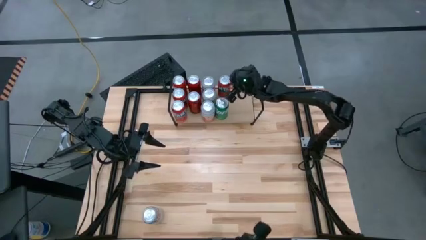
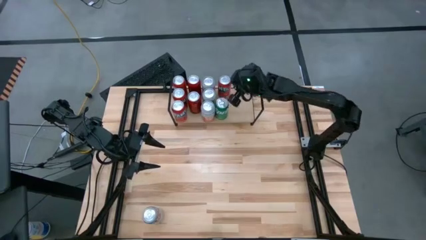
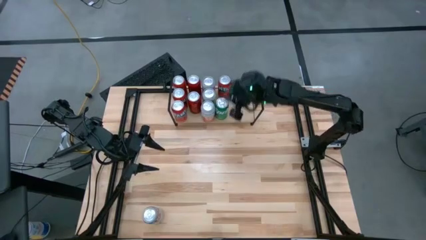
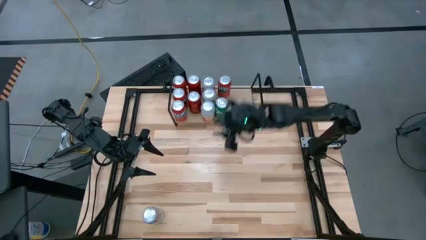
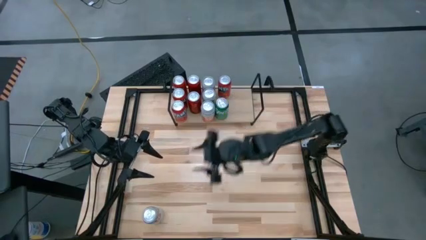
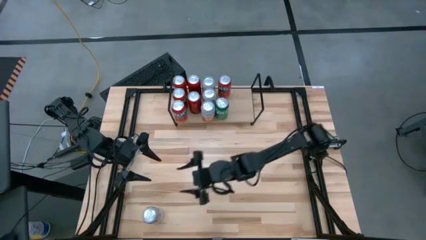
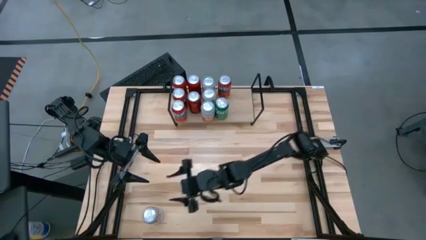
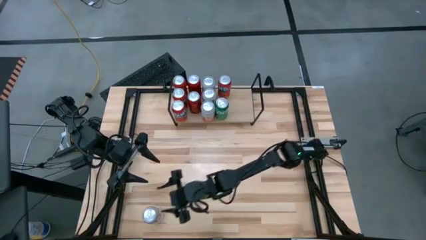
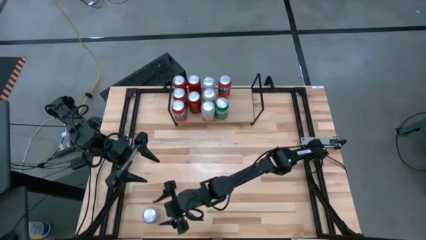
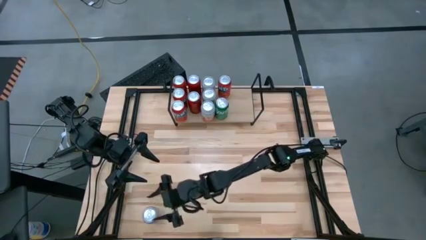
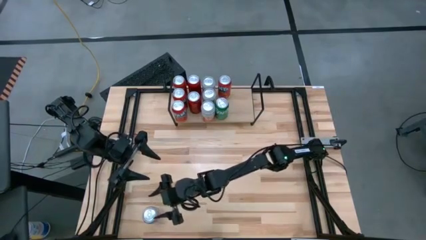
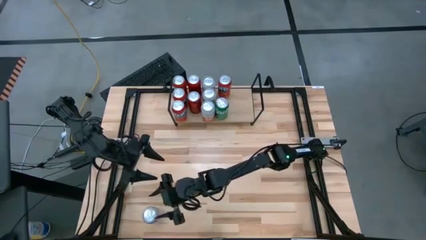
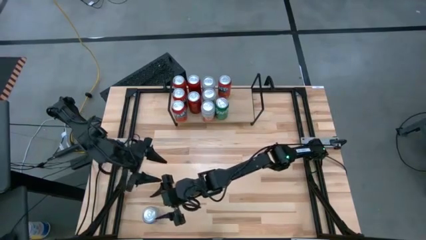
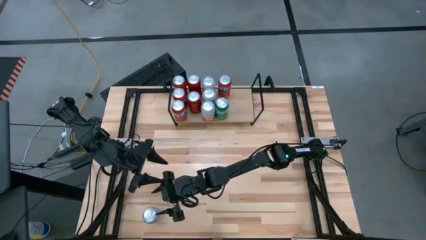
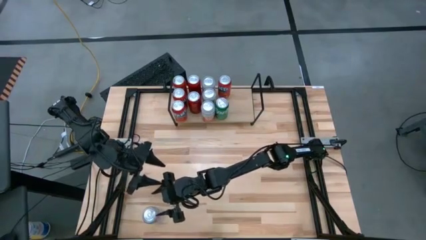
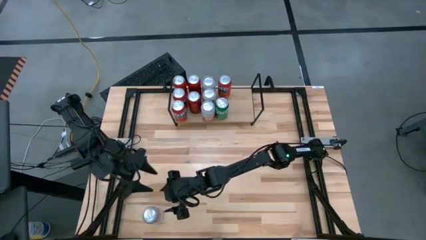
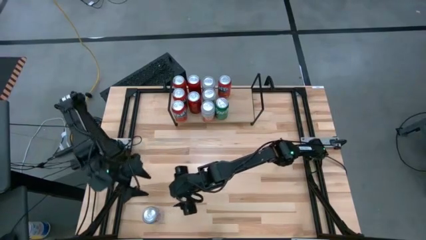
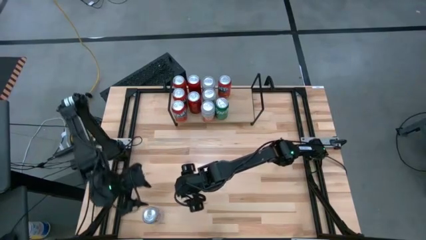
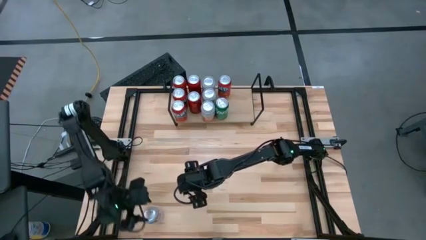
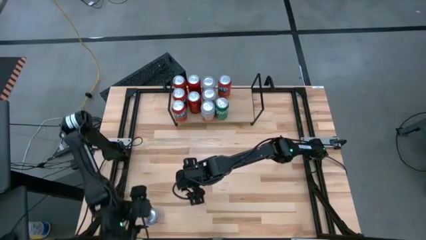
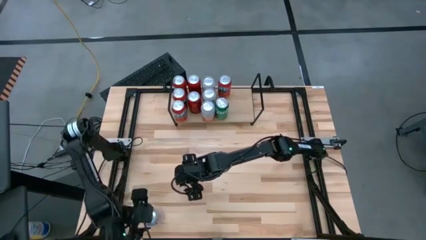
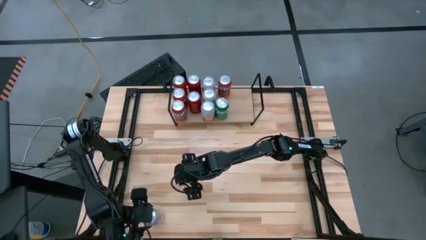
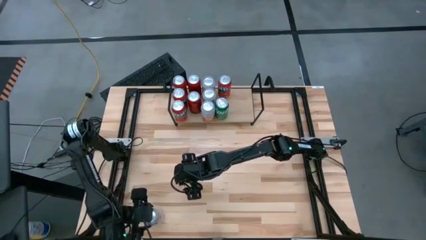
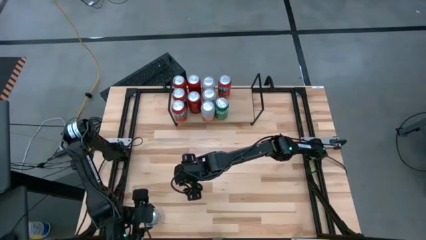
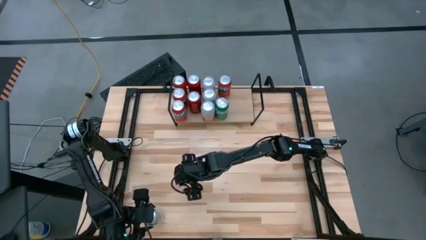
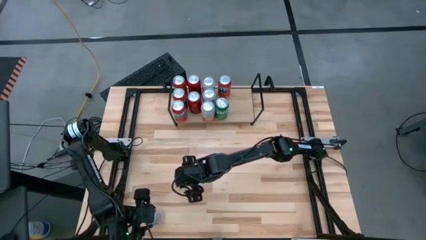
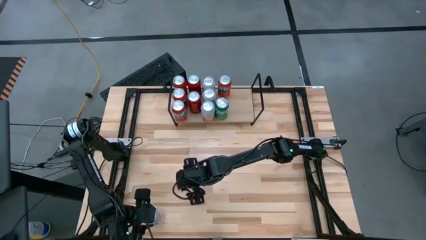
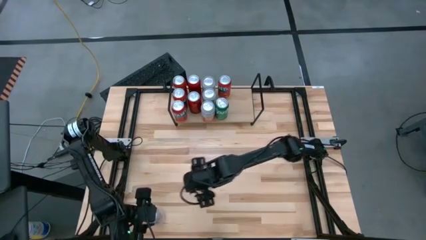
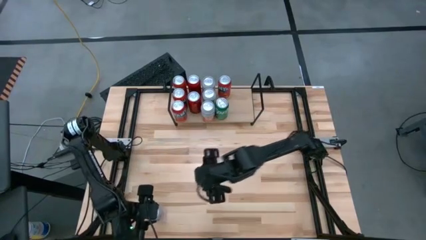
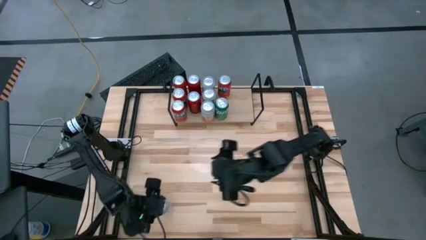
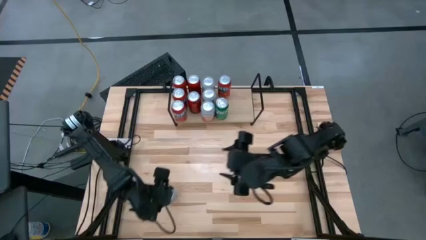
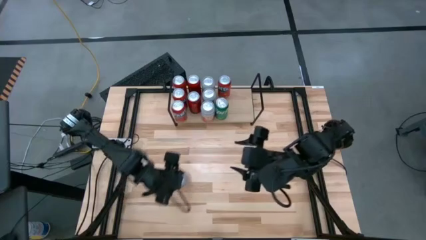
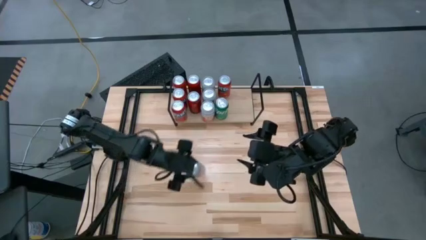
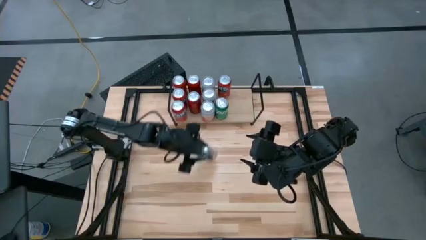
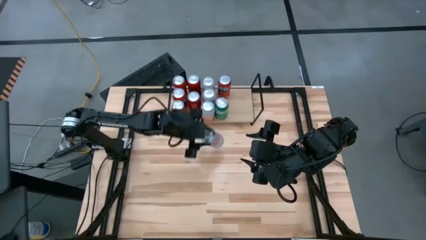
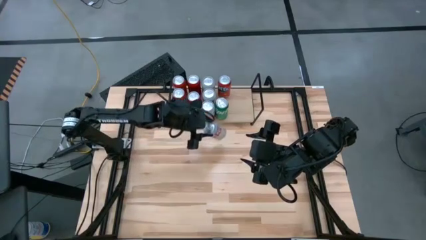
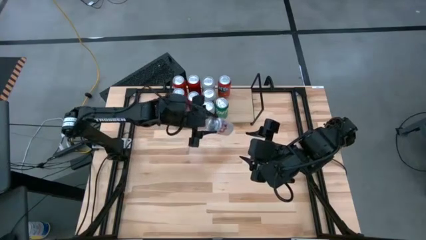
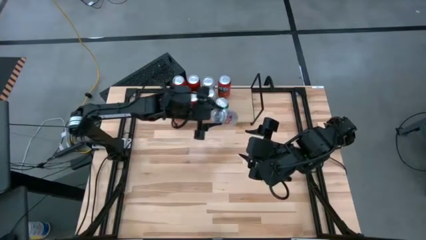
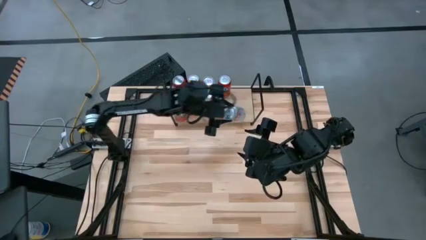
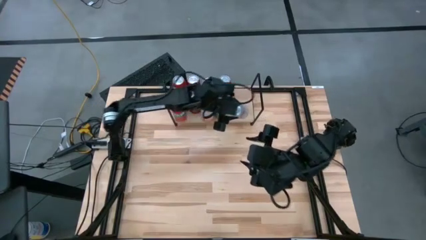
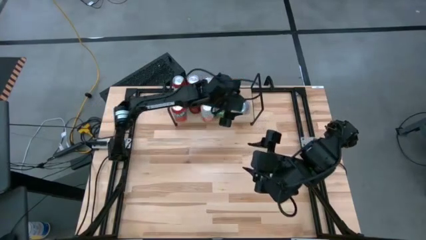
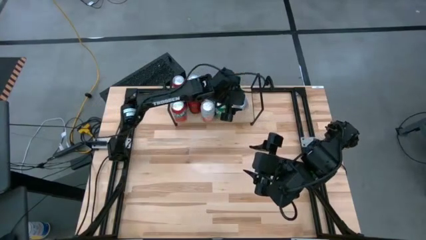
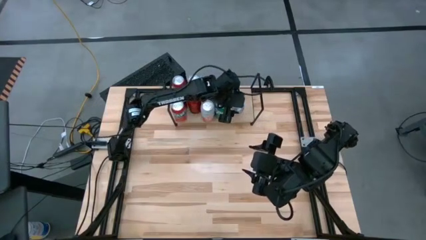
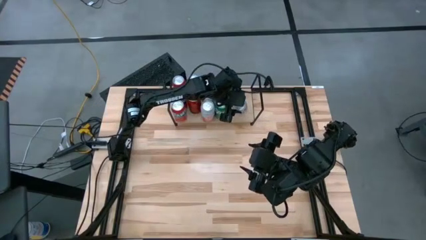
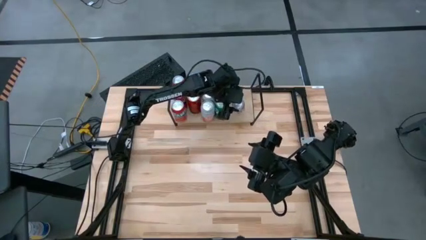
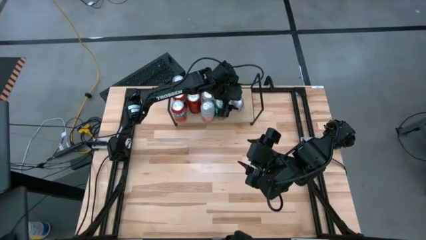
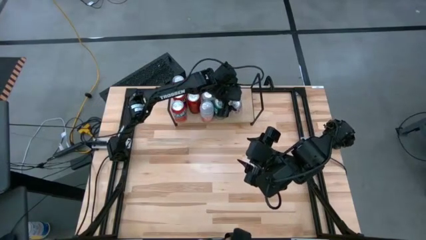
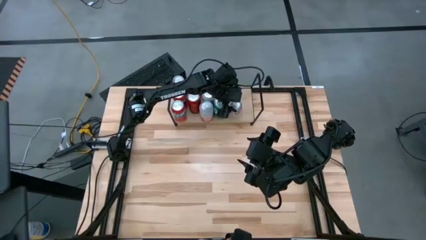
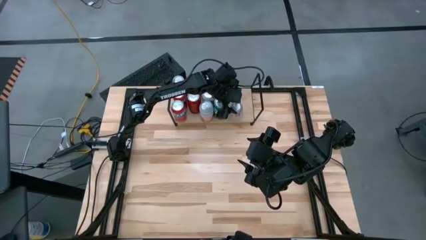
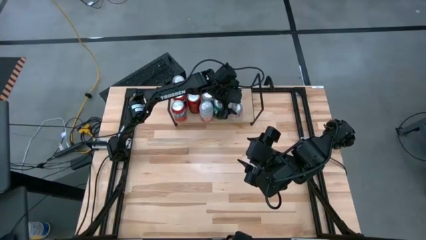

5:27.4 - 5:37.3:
Task: Place canned beverage on shelf
Put the red silver soda can on the shelf

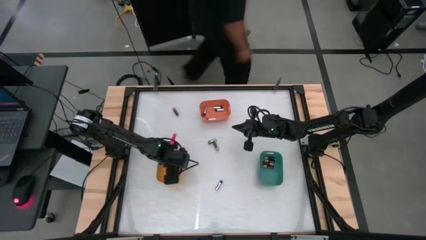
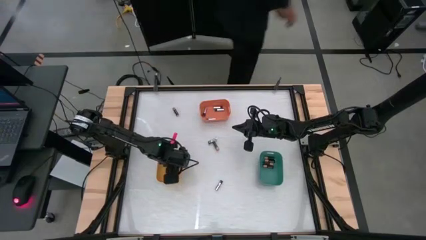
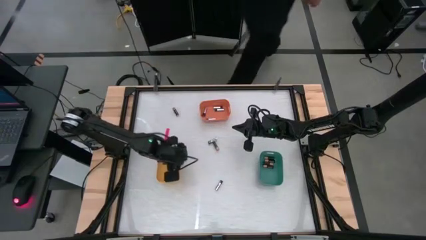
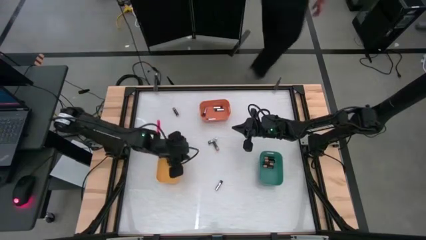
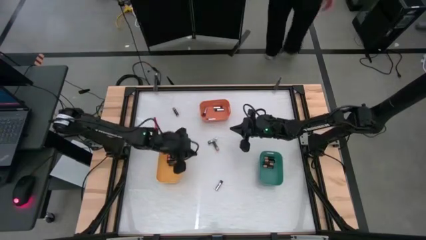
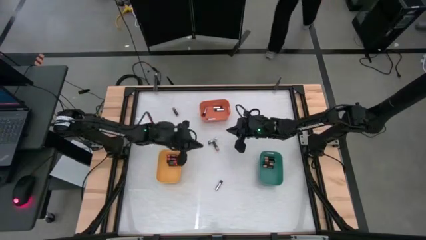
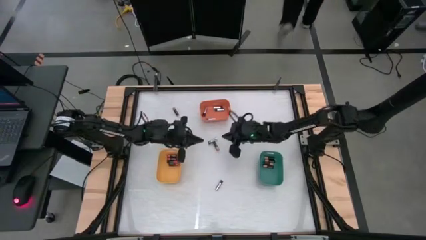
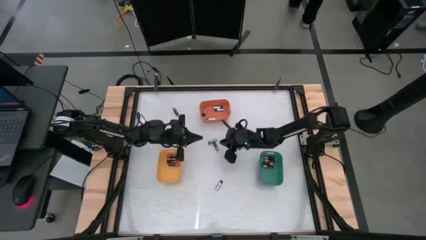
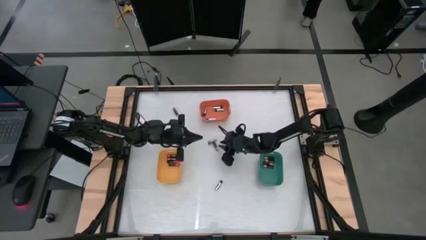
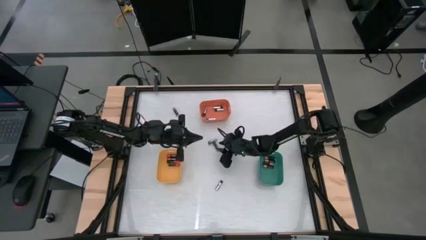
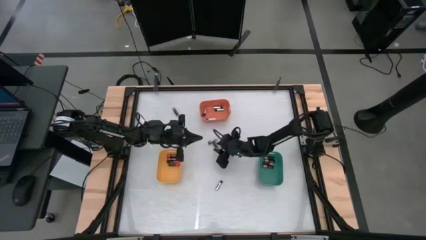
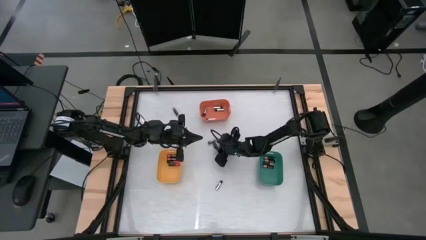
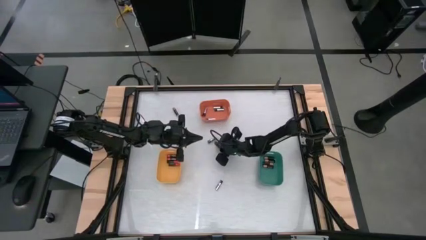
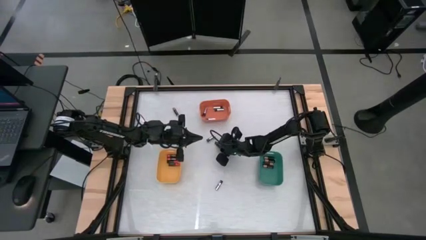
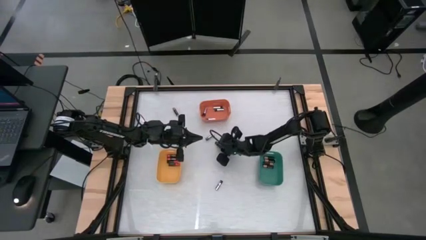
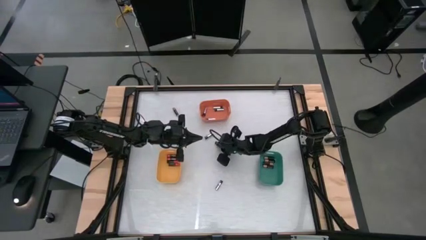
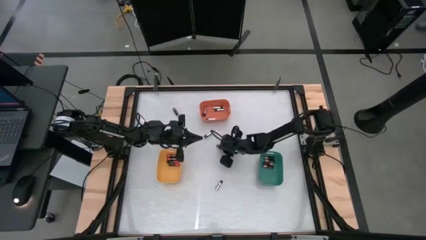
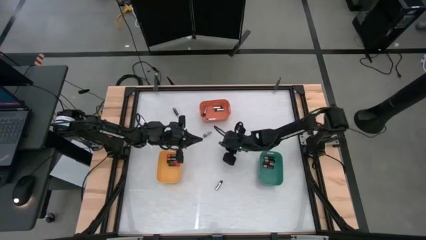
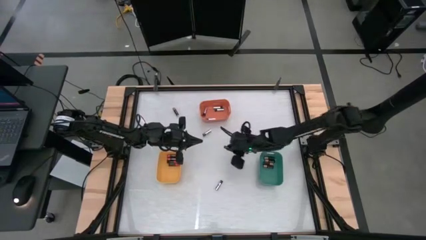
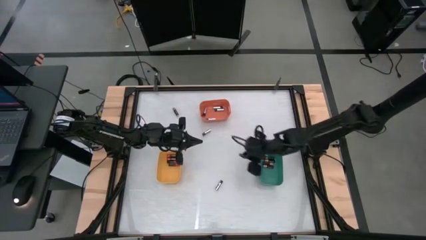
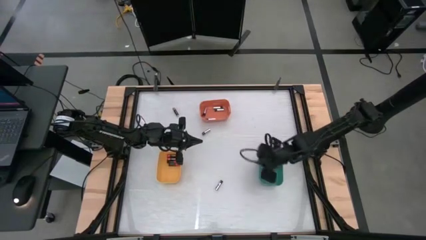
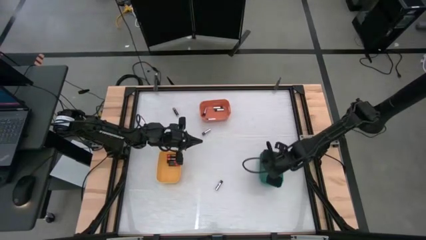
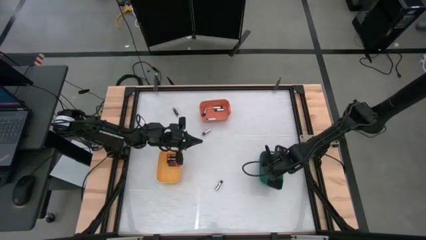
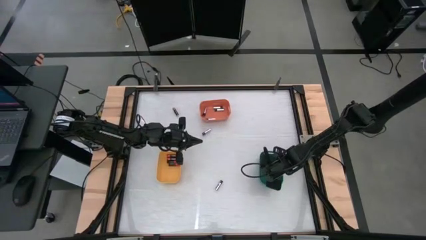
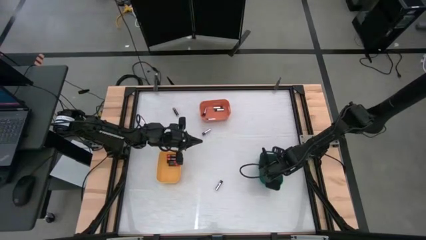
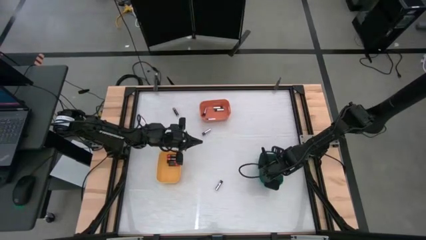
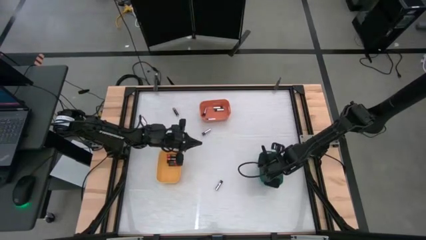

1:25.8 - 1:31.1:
Task: Sort batteries
Put the brown battery into the green bin

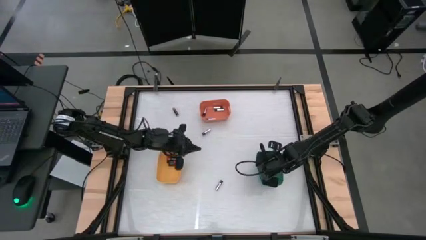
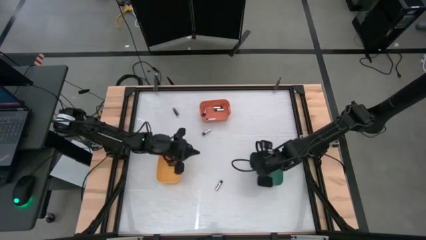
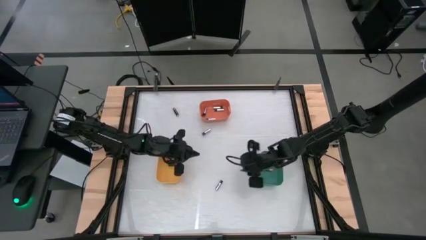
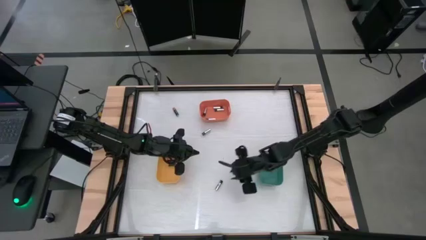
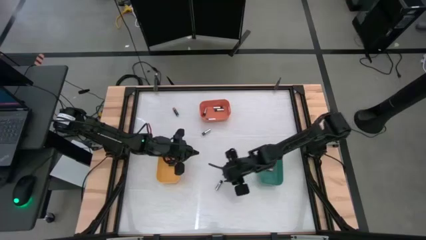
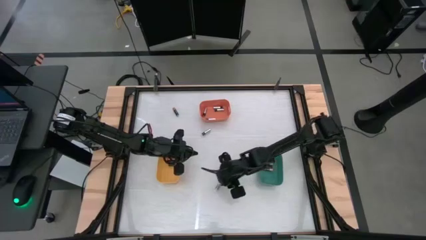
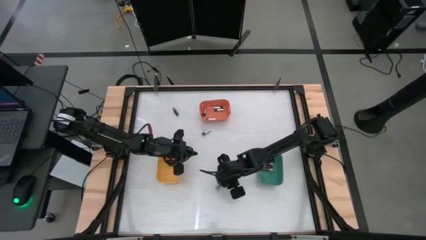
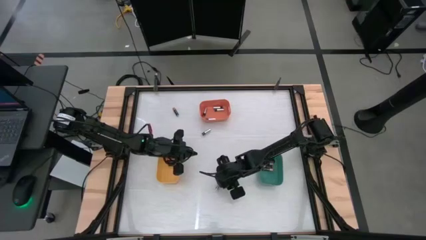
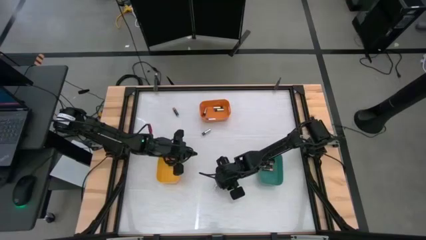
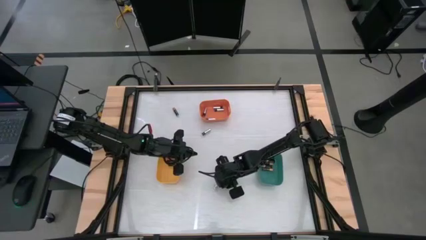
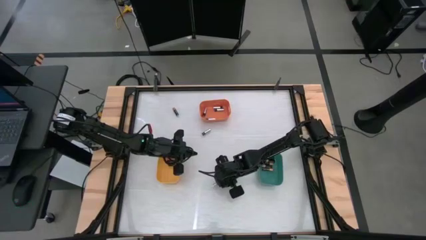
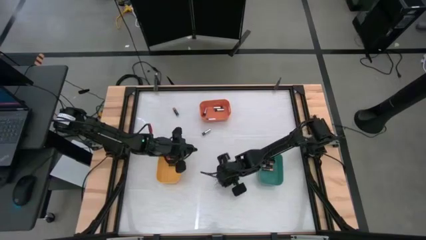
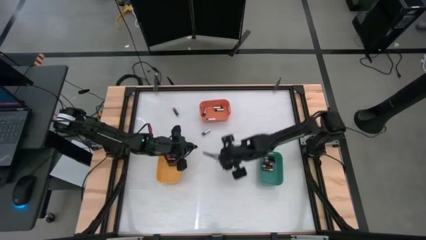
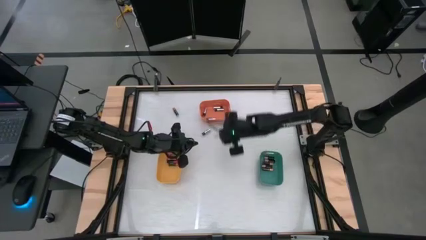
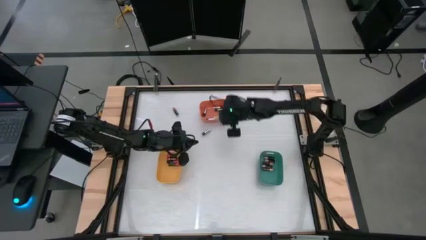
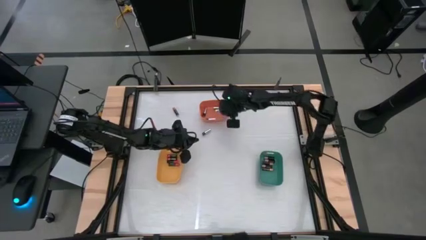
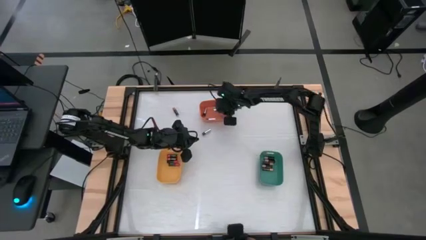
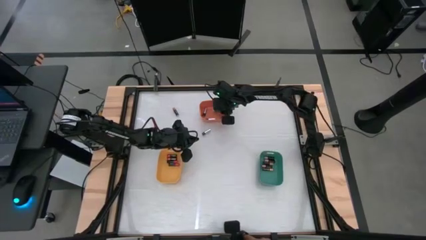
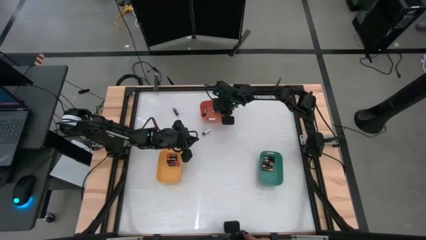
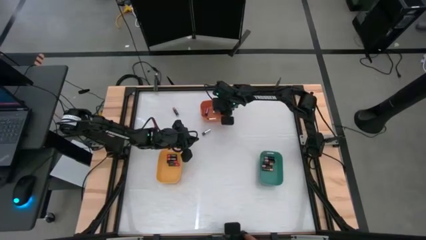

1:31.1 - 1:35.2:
Put the silver battery into the orange bin
